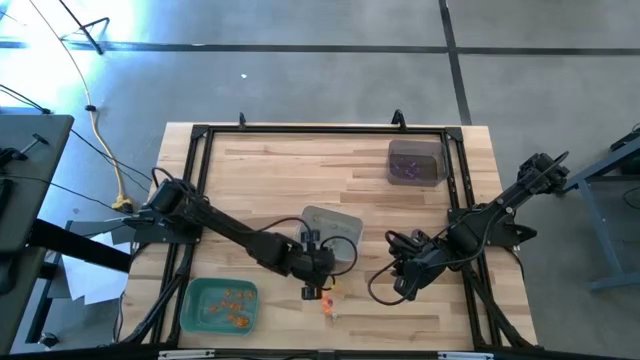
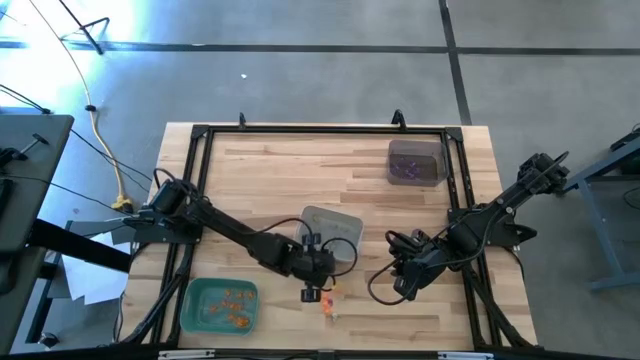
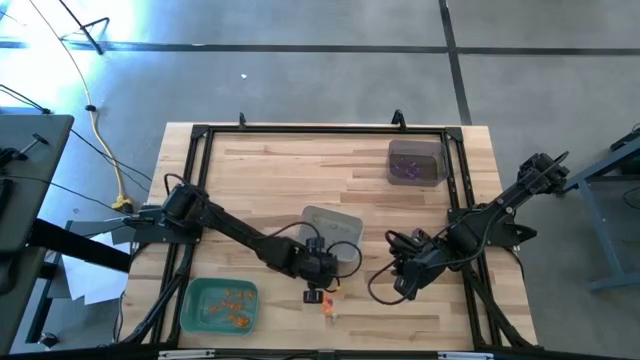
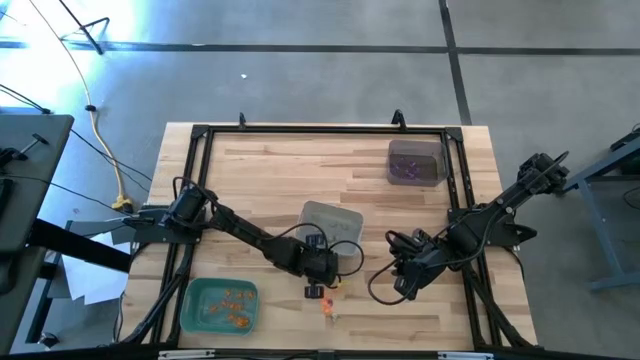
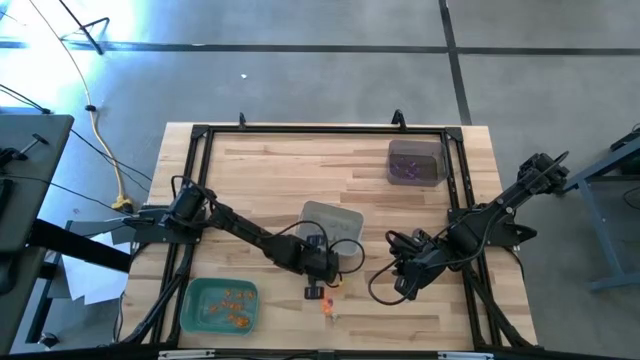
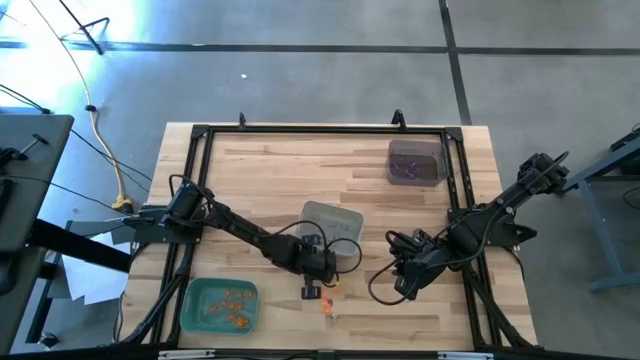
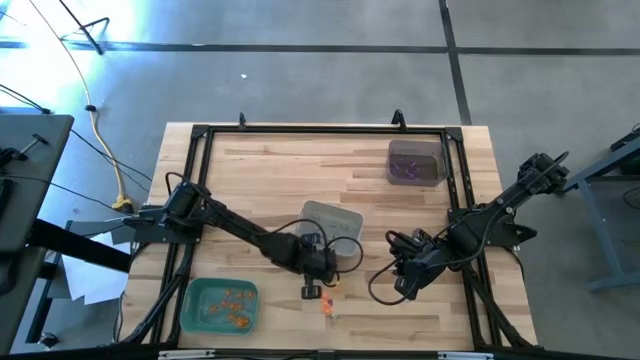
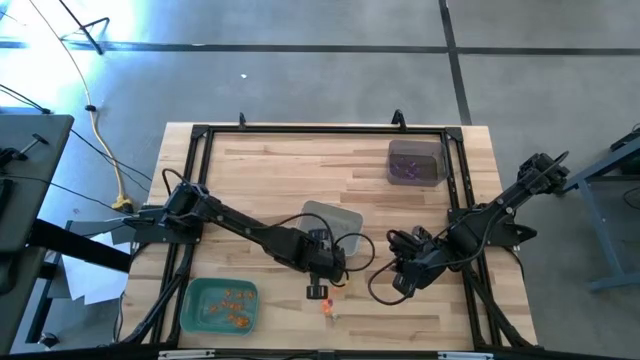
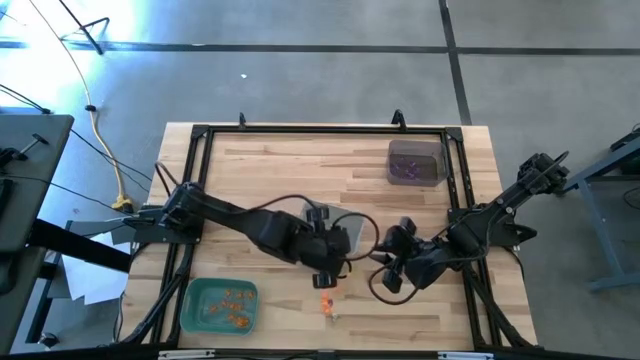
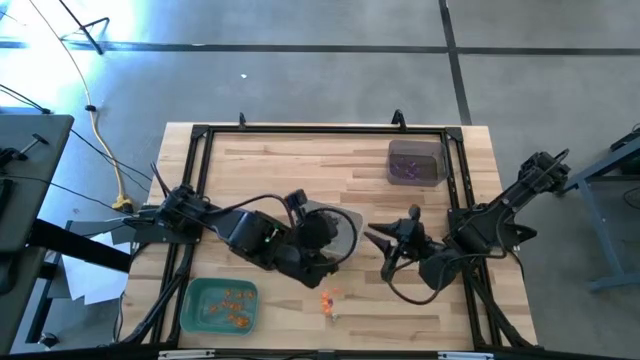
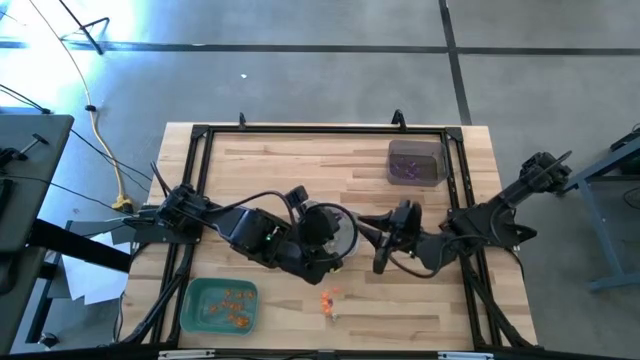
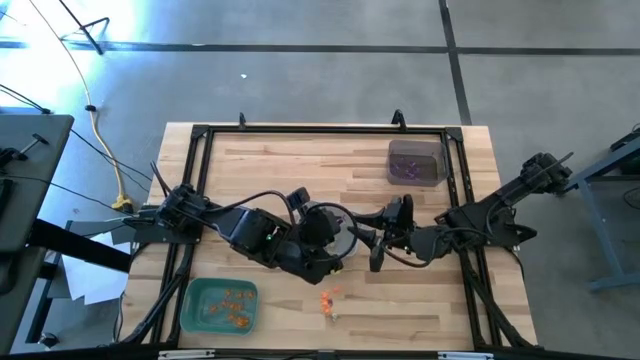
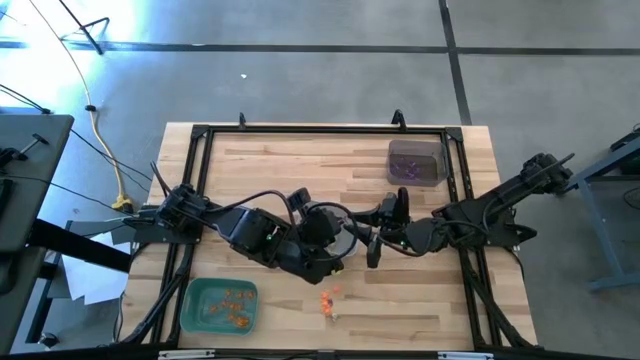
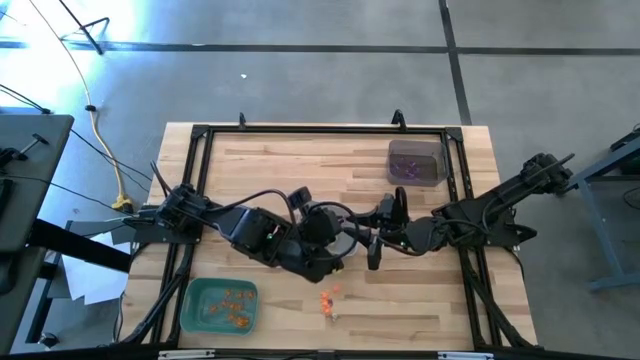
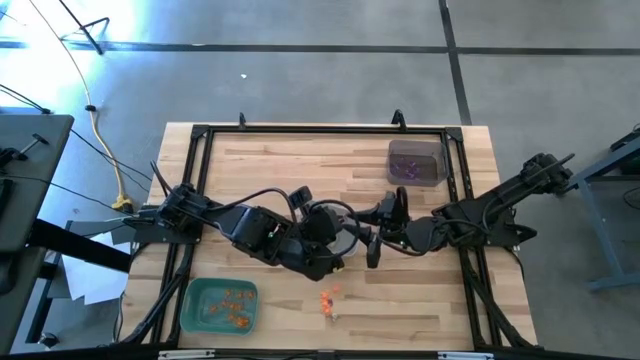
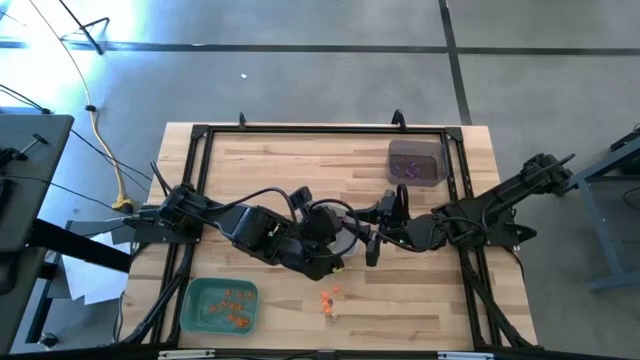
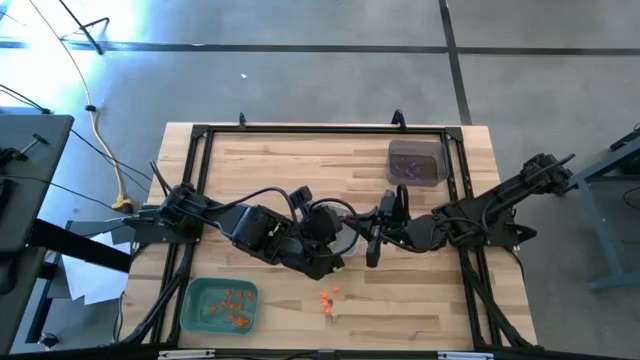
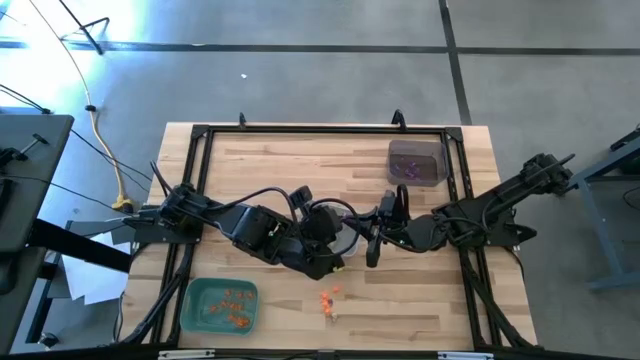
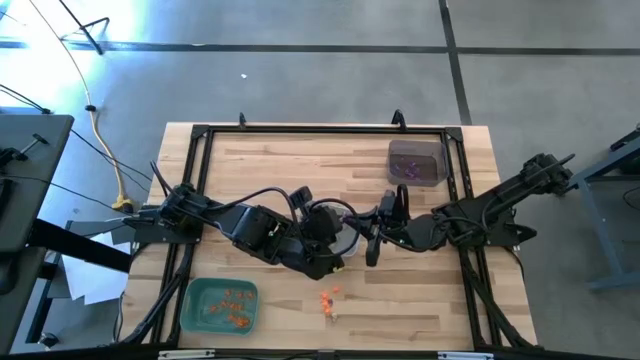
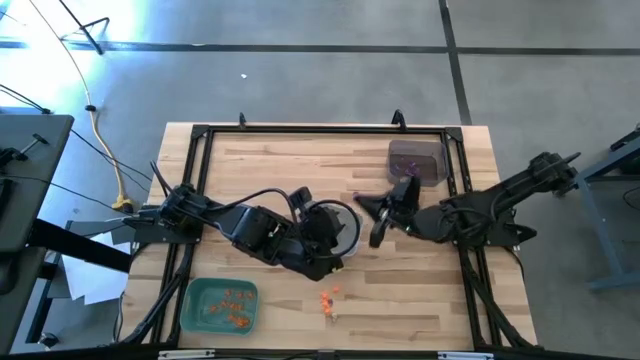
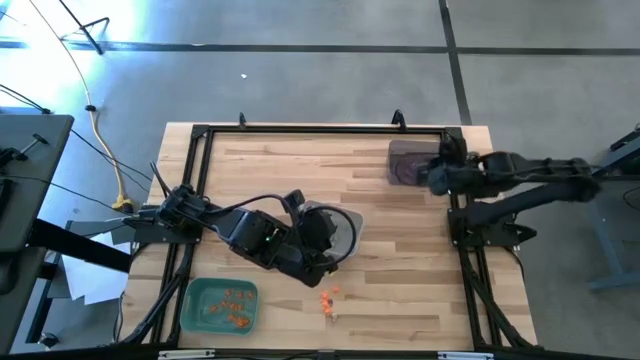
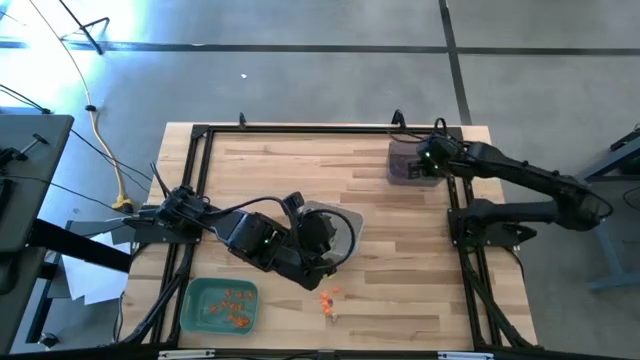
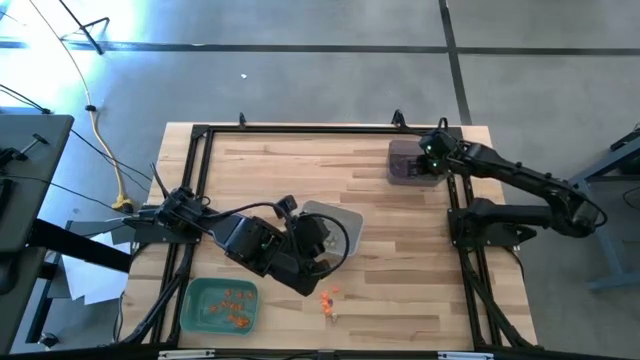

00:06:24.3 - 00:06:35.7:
Task: Sort Halloween decoration
Put the violet witch hat toy into the black bin

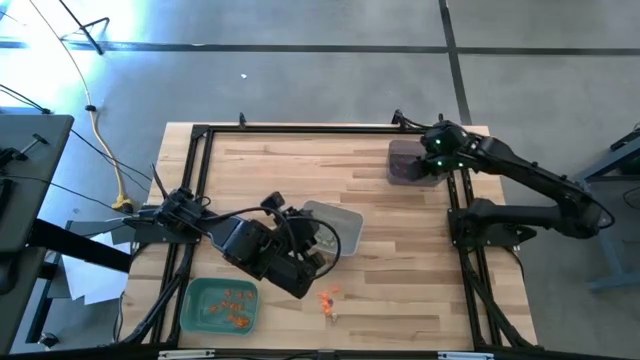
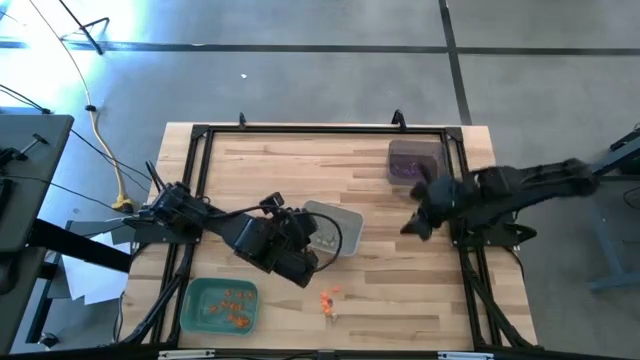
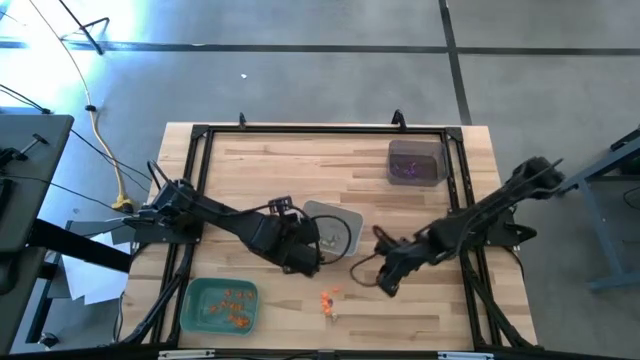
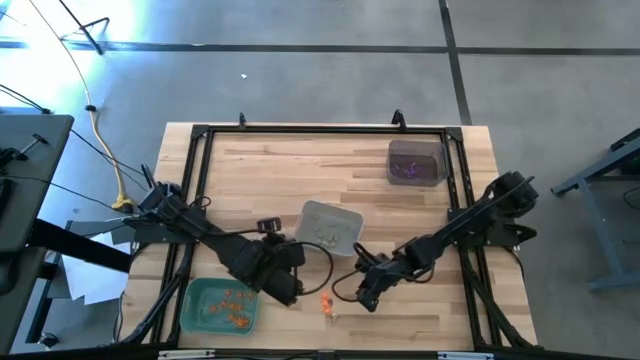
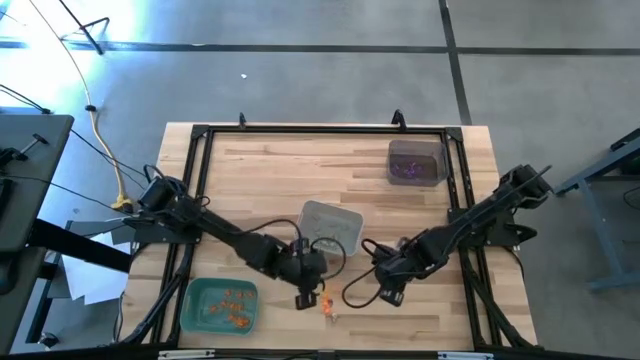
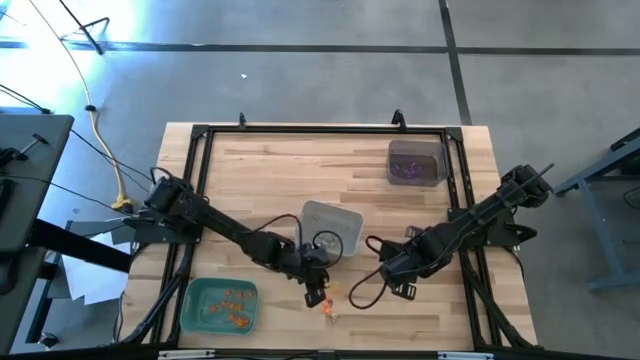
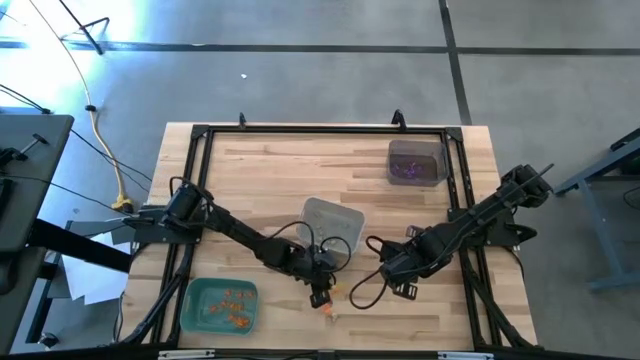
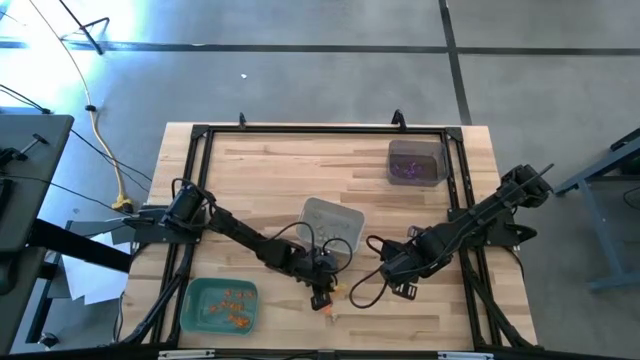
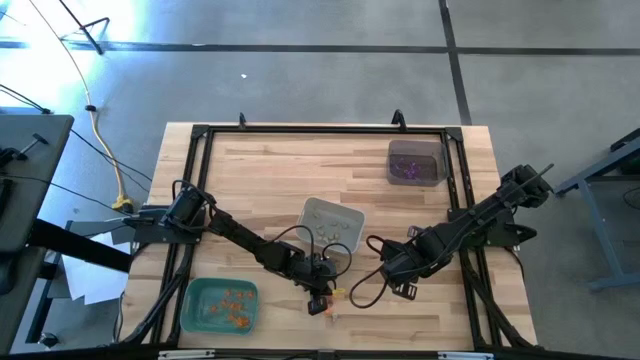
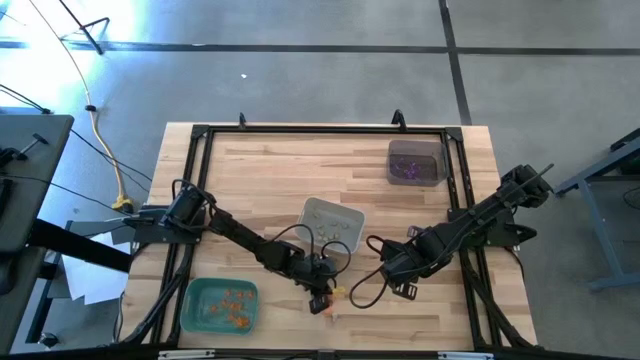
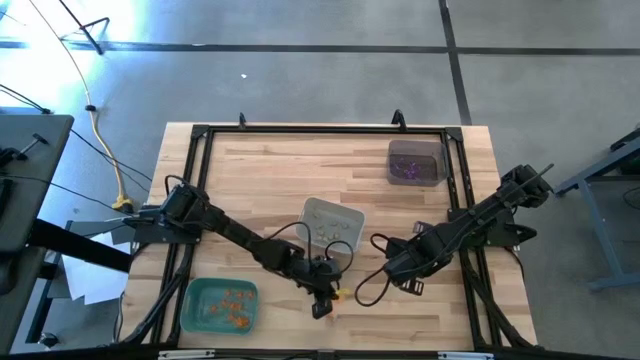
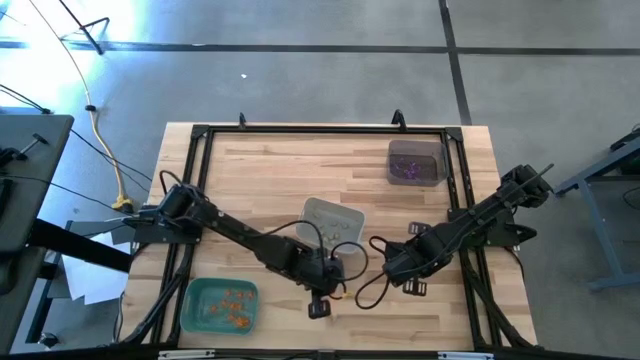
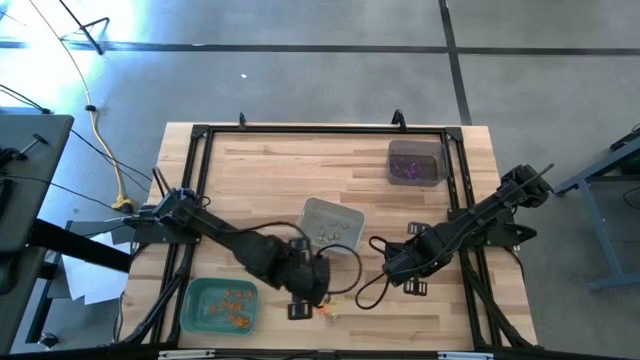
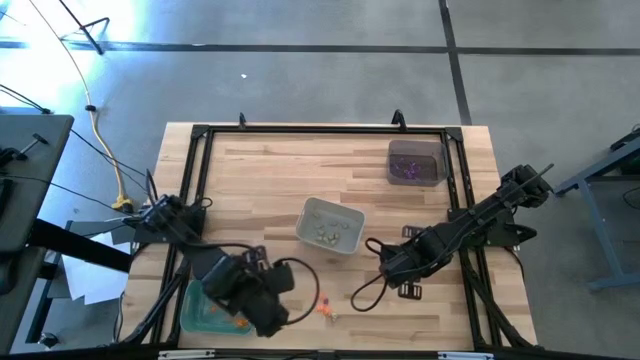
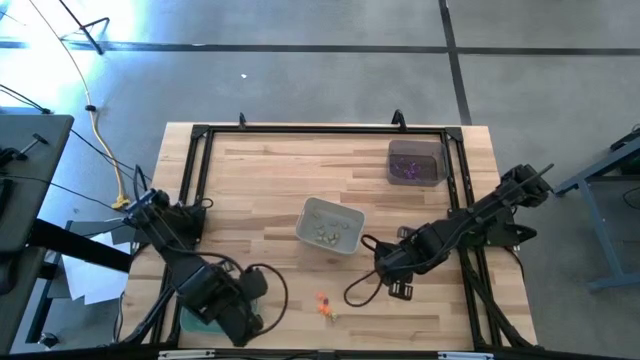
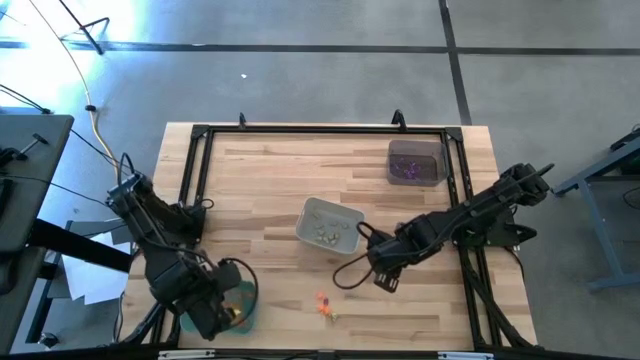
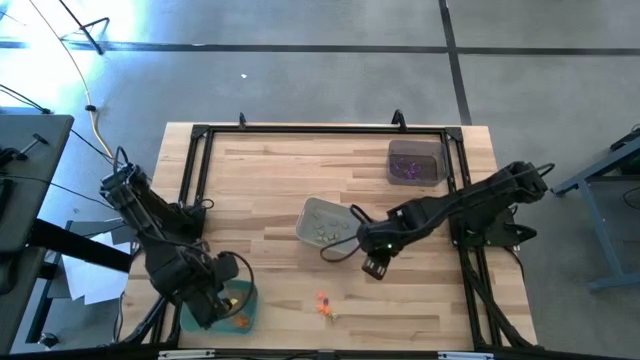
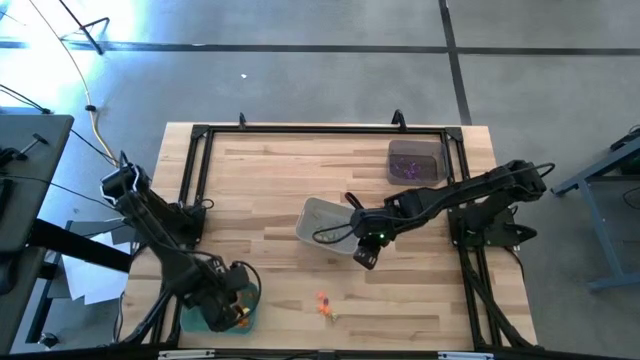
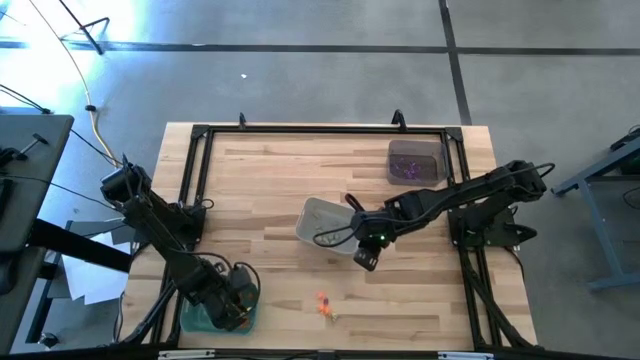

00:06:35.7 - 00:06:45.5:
Put the orange spider toy into the green bin
